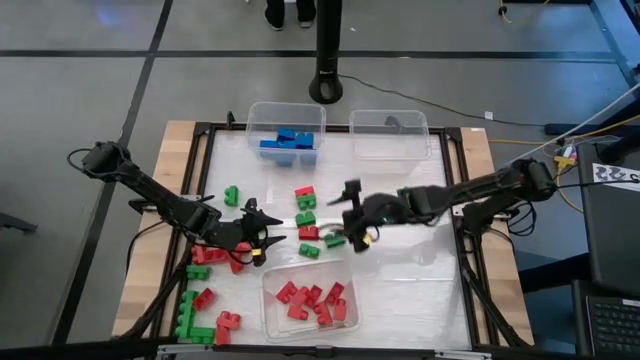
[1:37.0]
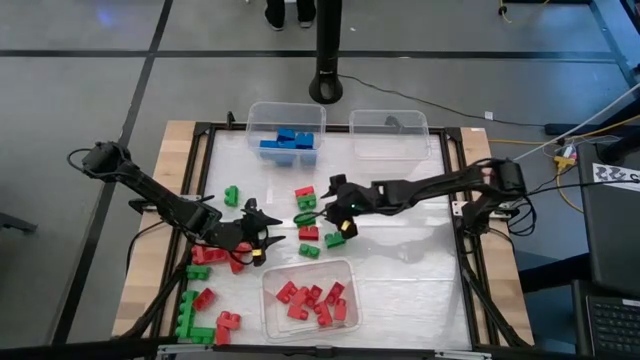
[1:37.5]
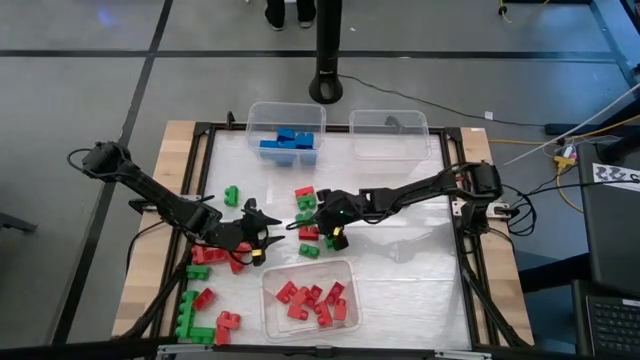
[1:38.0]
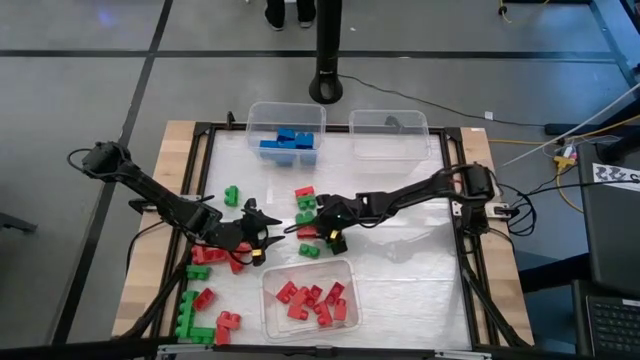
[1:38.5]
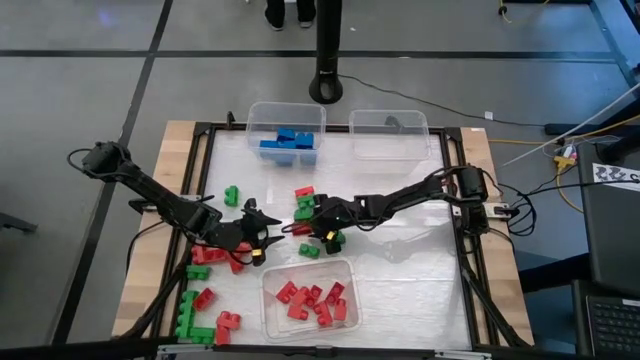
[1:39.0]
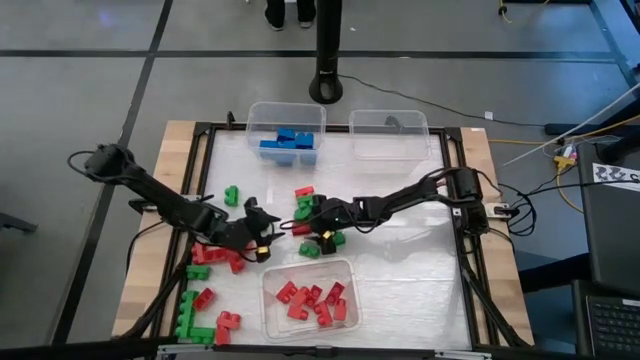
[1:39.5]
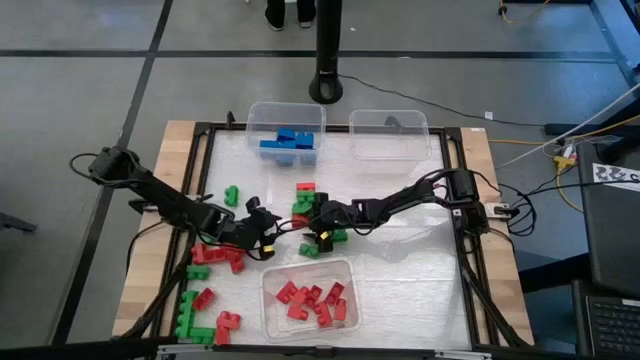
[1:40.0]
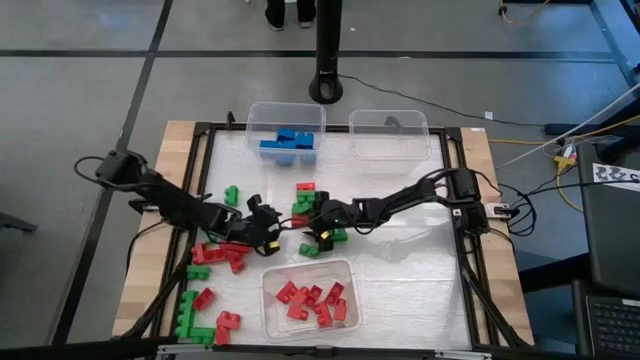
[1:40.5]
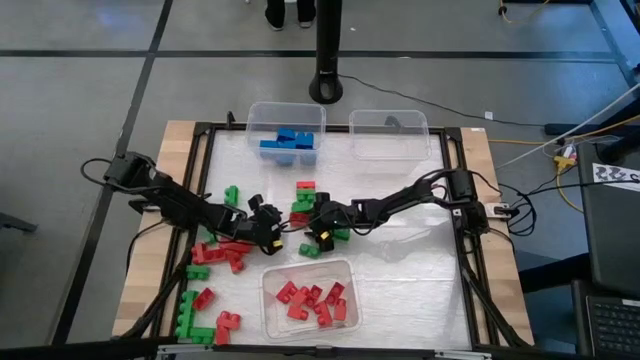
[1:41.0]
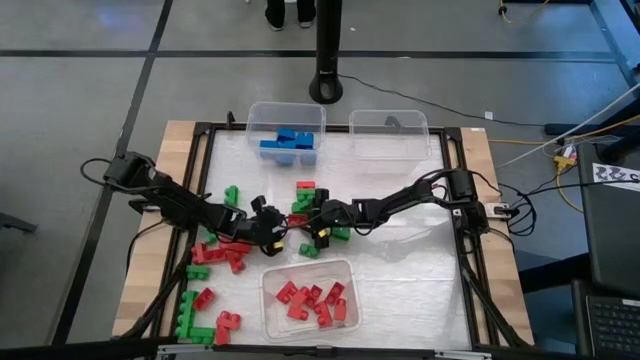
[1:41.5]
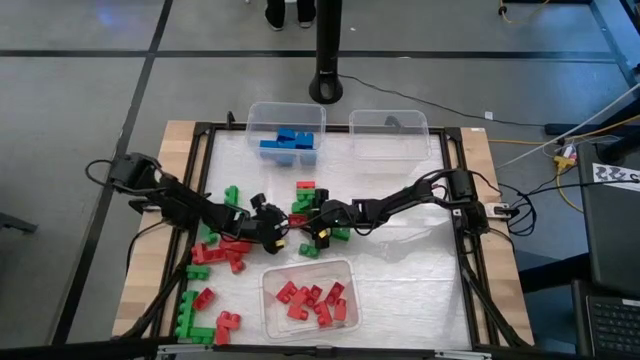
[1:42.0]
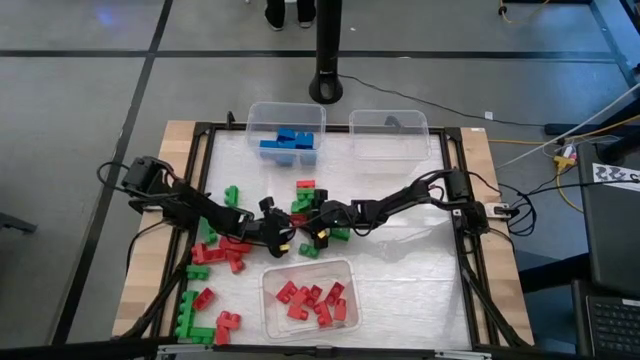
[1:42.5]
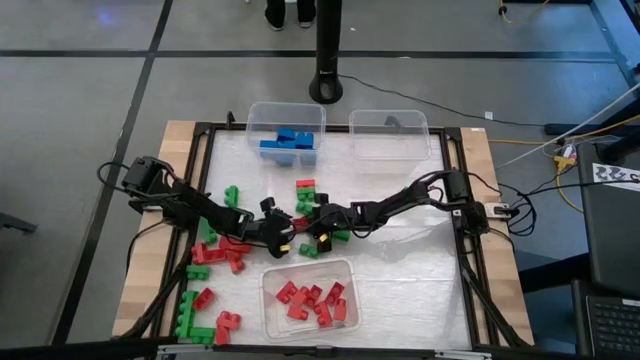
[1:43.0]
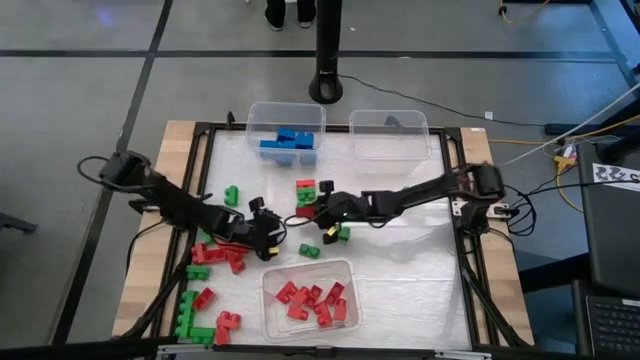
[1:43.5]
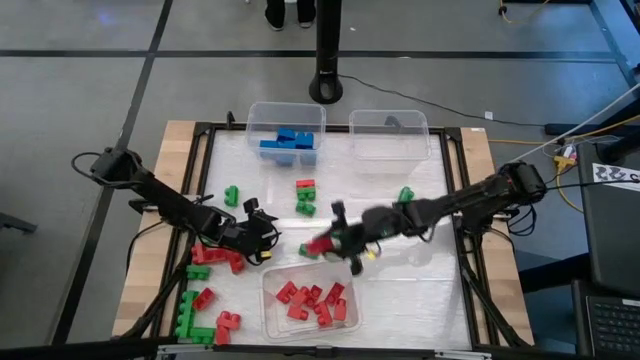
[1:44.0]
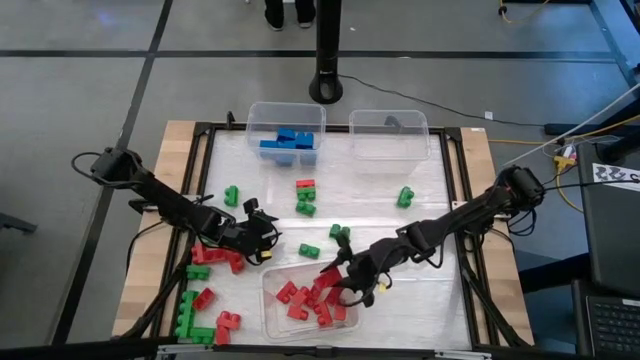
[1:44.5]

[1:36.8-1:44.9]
Task: Sort blocks
Put the red game piece into the bottom transparent bin

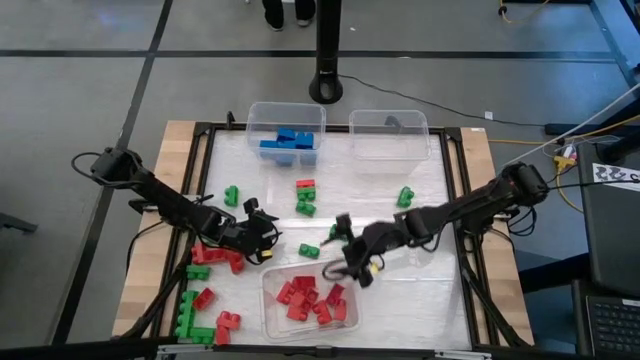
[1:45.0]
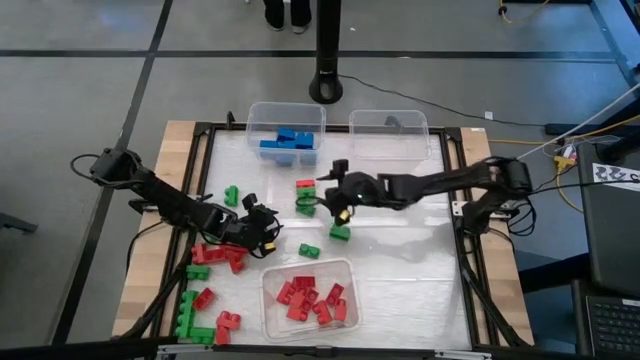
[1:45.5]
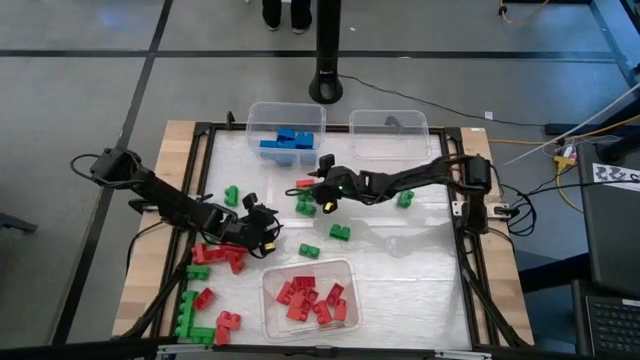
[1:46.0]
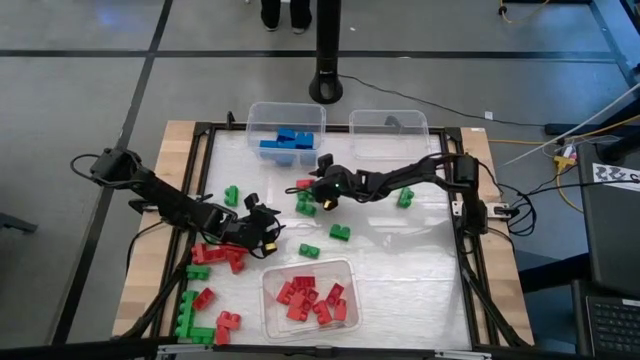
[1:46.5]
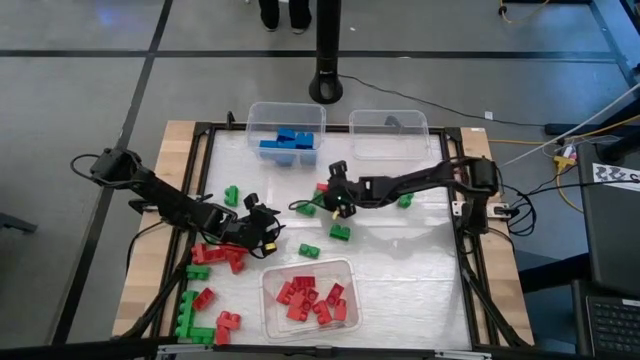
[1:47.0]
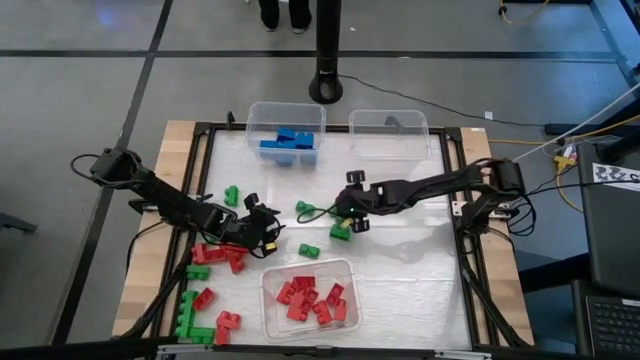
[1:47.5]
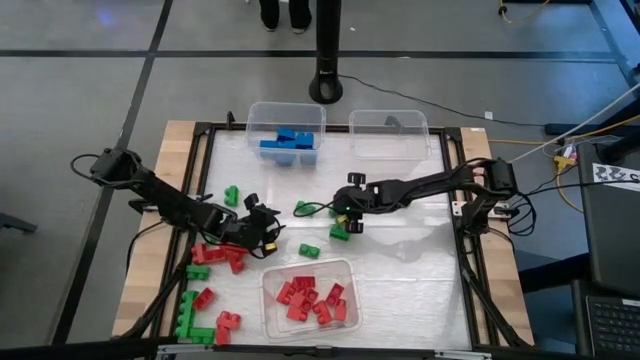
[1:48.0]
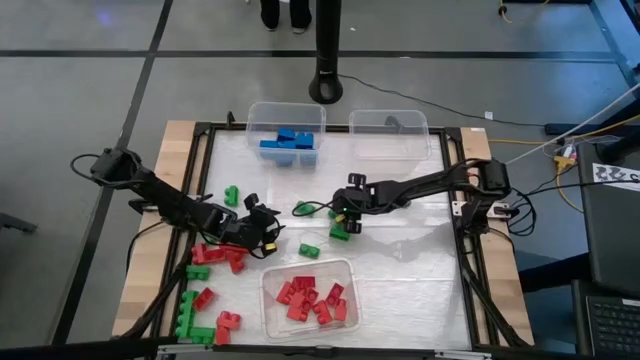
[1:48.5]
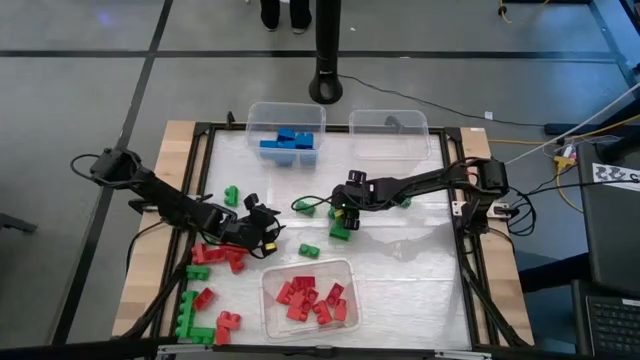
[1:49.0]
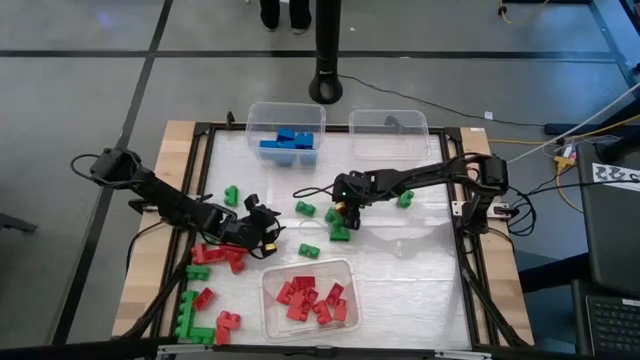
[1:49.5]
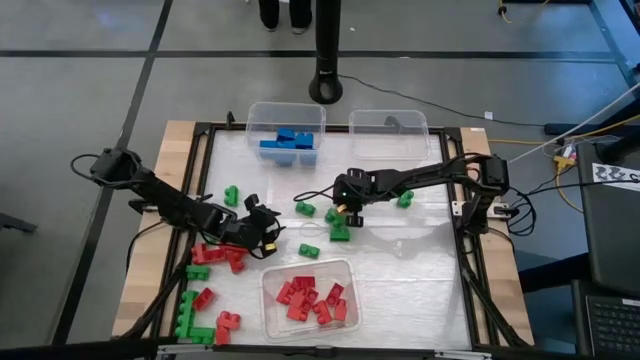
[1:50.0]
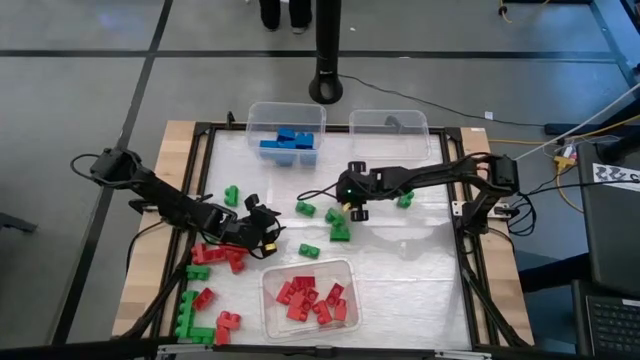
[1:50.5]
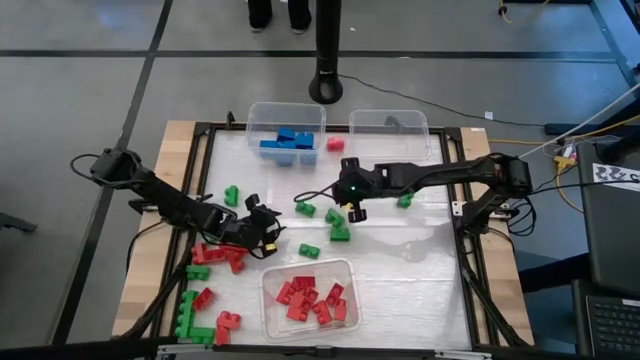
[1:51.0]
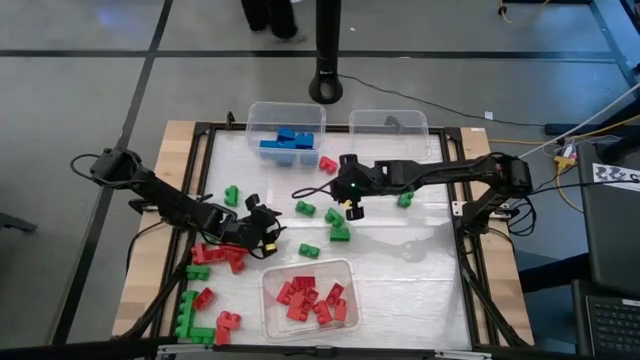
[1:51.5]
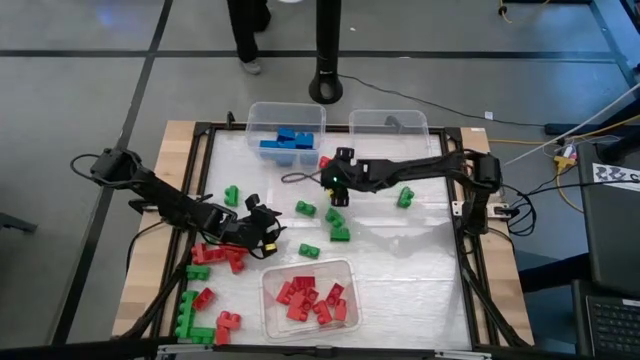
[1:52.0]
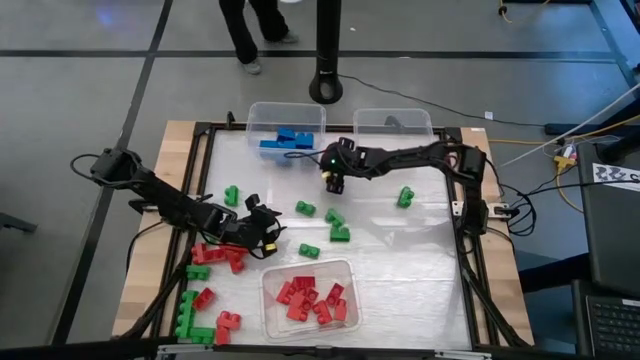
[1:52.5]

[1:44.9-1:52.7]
Put the red game piece into the bottom transparent bin

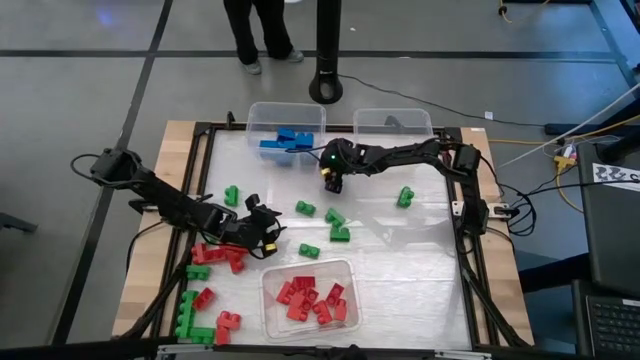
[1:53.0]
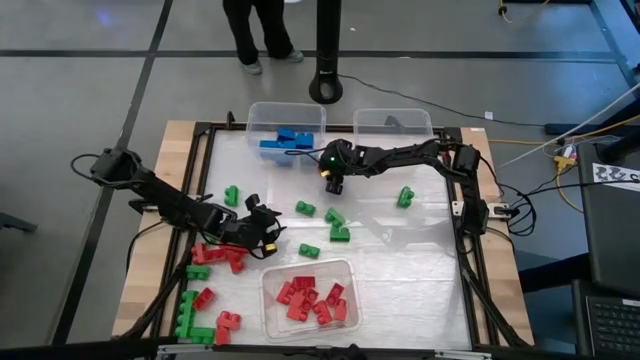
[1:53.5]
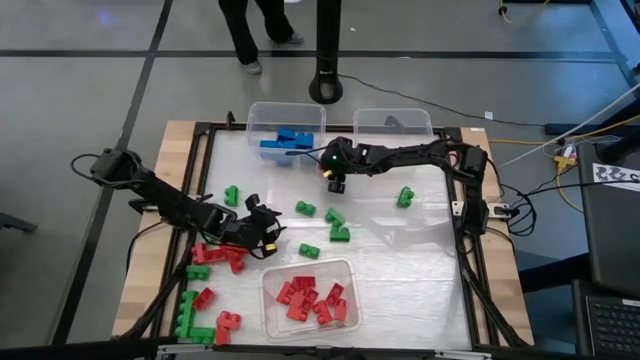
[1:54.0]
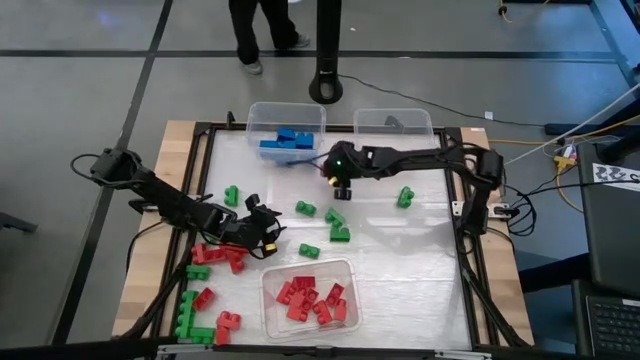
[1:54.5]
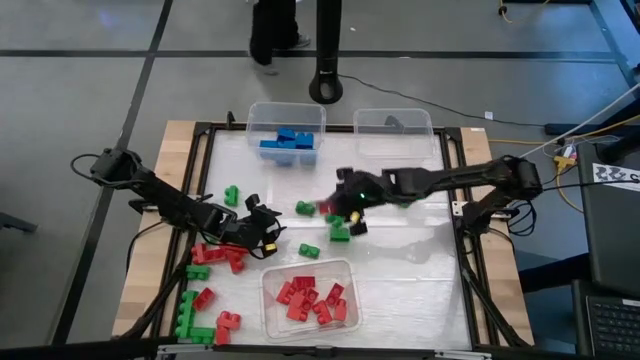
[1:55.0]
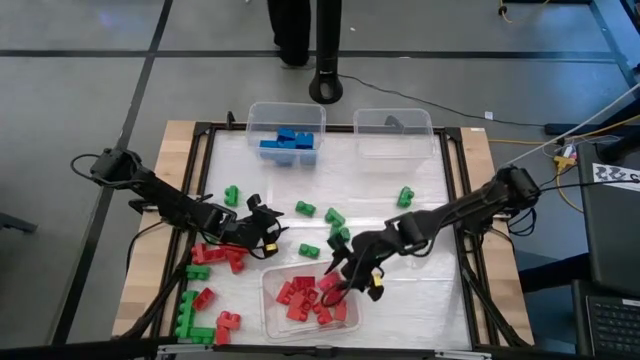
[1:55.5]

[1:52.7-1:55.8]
Put the red game piece into the bottom transparent bin
